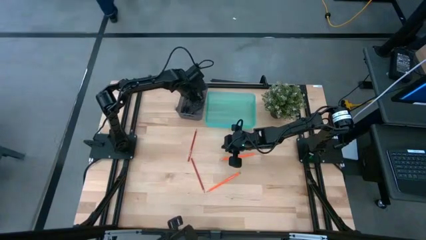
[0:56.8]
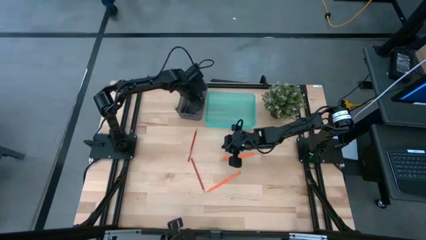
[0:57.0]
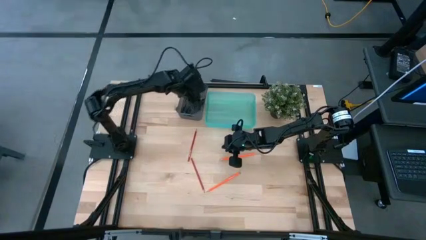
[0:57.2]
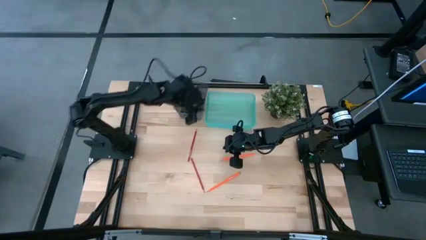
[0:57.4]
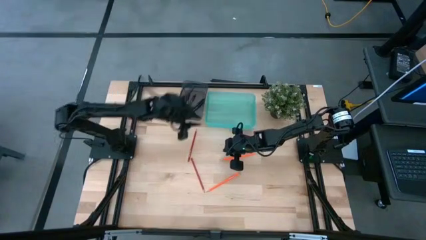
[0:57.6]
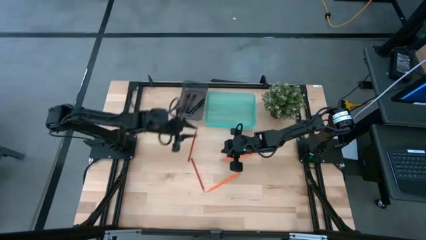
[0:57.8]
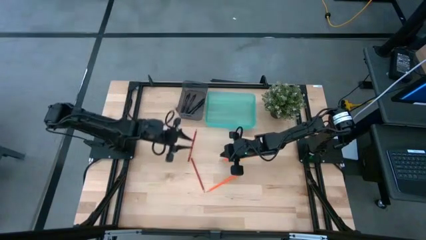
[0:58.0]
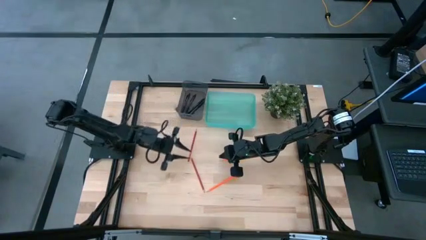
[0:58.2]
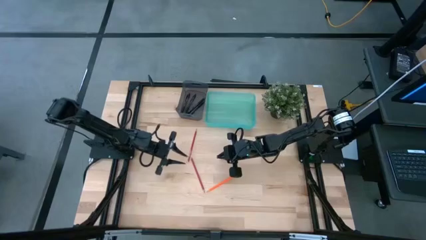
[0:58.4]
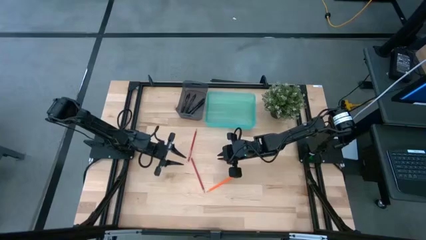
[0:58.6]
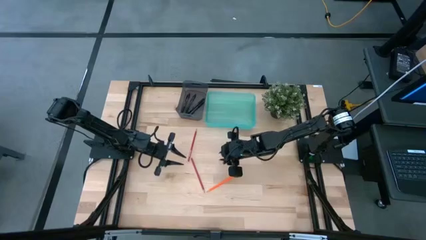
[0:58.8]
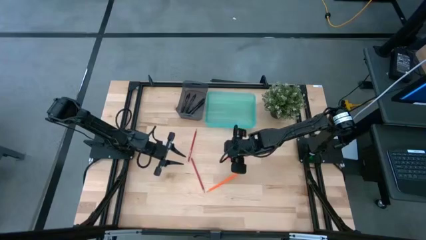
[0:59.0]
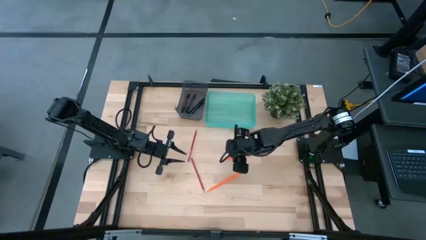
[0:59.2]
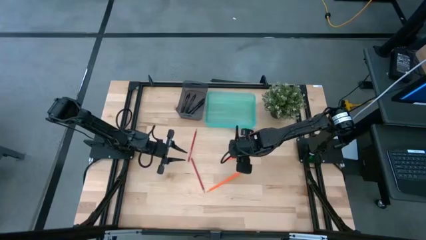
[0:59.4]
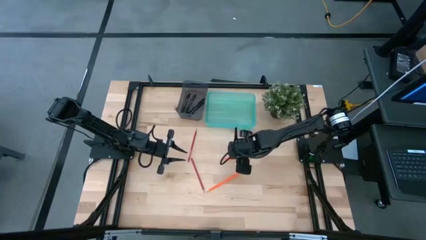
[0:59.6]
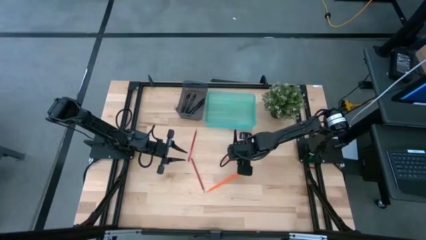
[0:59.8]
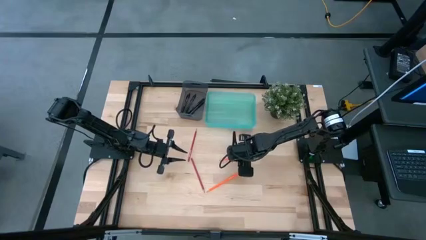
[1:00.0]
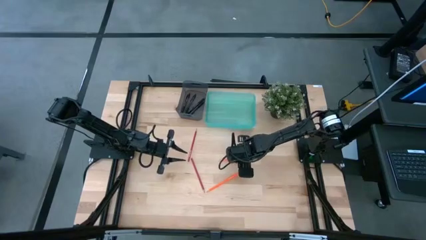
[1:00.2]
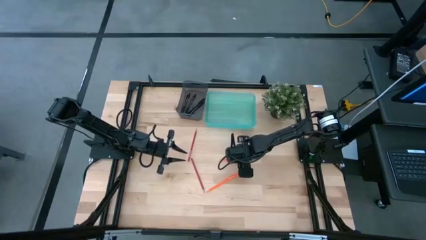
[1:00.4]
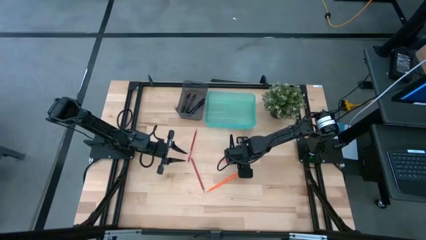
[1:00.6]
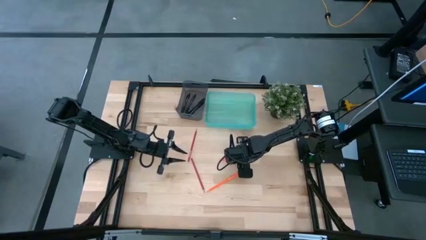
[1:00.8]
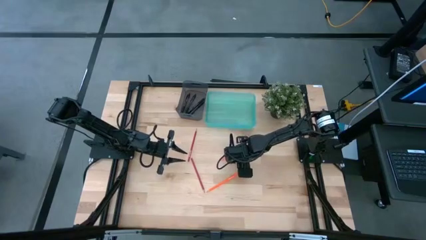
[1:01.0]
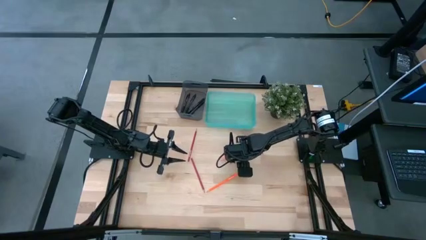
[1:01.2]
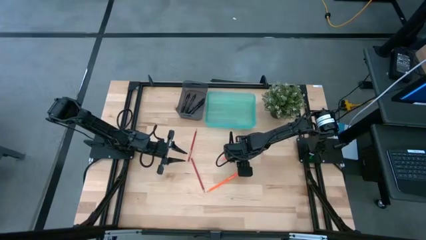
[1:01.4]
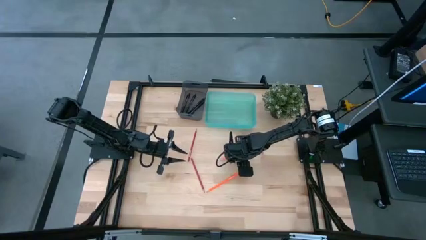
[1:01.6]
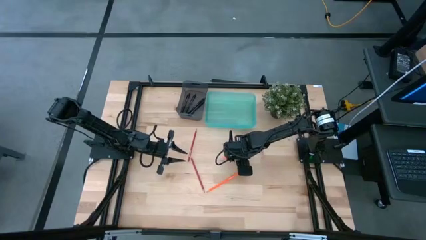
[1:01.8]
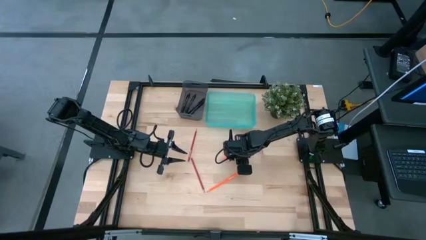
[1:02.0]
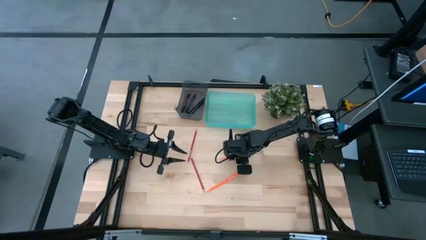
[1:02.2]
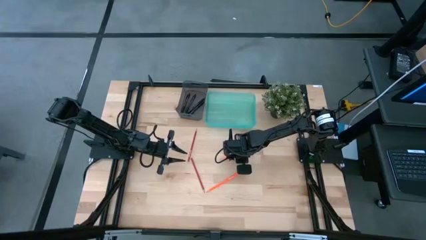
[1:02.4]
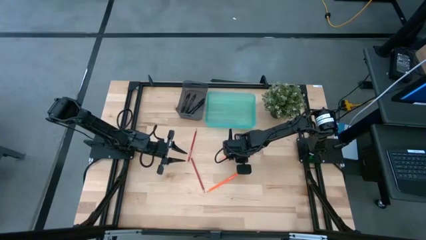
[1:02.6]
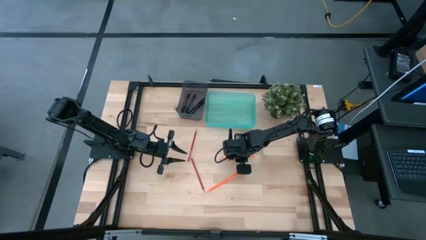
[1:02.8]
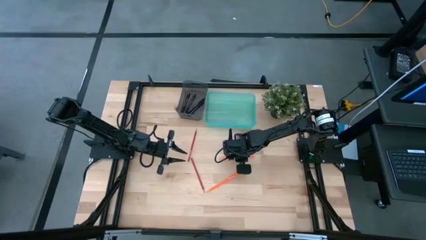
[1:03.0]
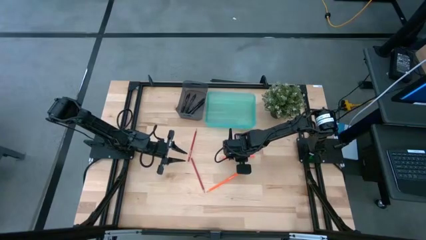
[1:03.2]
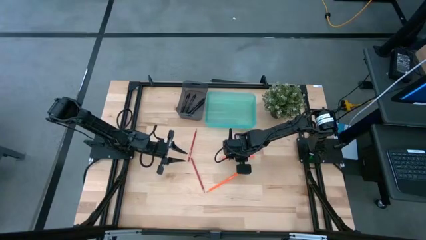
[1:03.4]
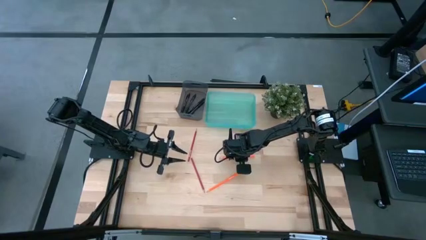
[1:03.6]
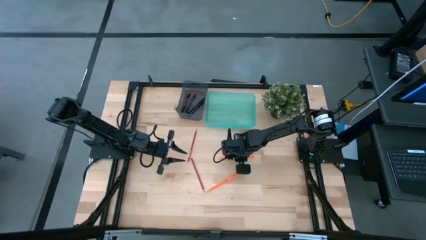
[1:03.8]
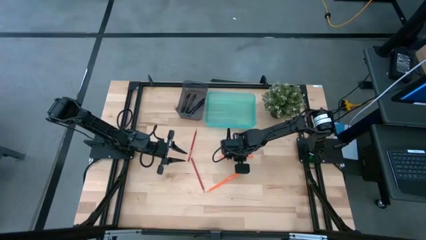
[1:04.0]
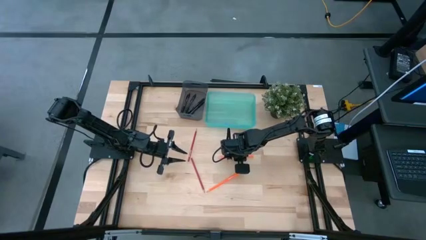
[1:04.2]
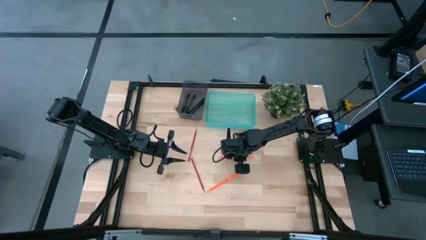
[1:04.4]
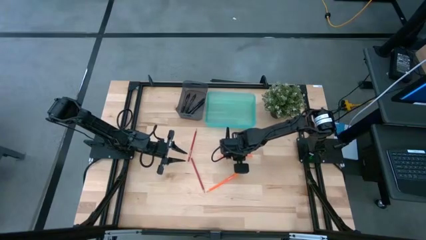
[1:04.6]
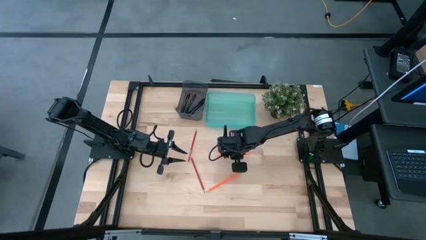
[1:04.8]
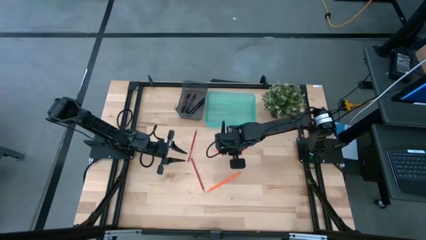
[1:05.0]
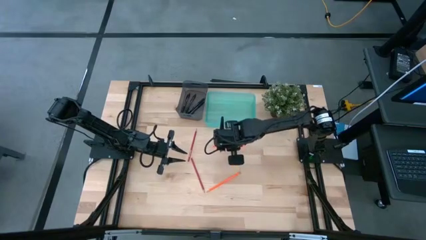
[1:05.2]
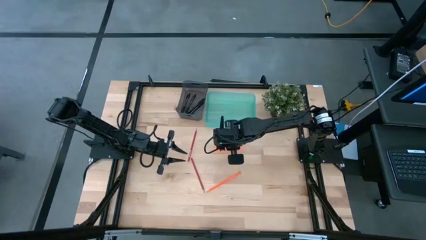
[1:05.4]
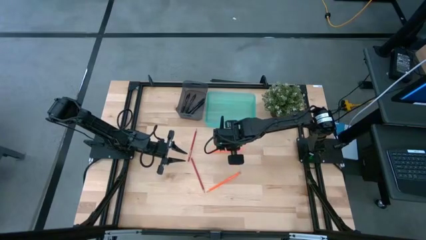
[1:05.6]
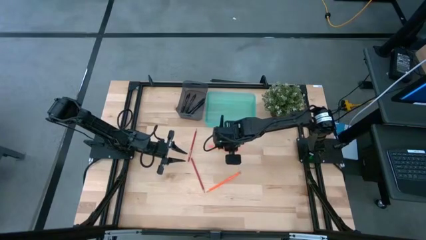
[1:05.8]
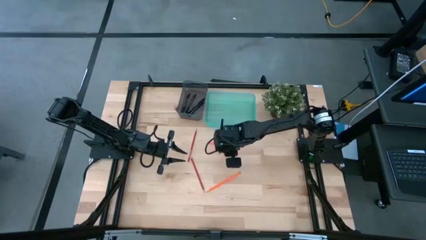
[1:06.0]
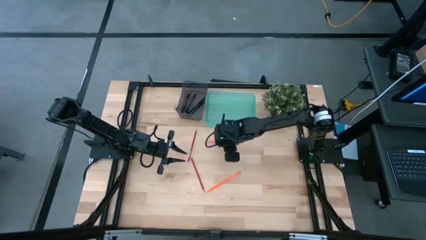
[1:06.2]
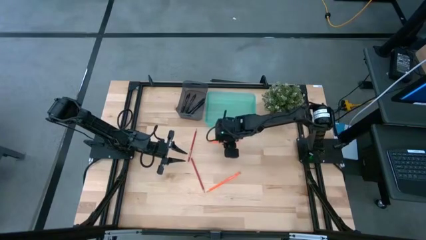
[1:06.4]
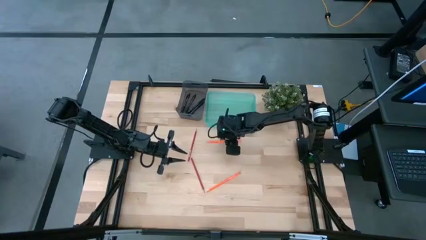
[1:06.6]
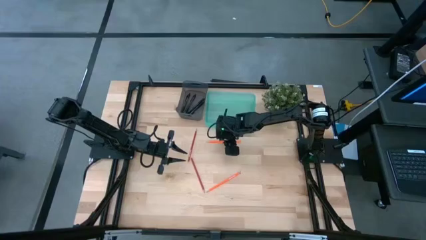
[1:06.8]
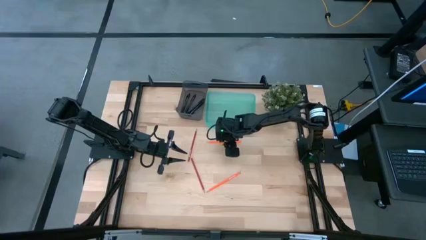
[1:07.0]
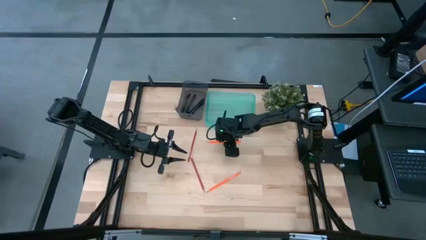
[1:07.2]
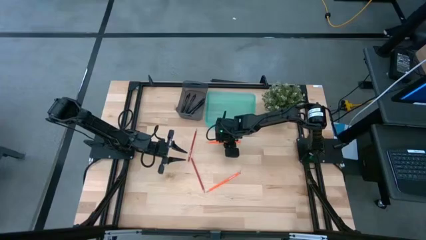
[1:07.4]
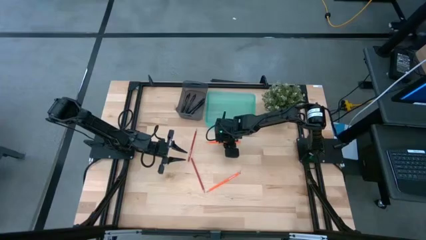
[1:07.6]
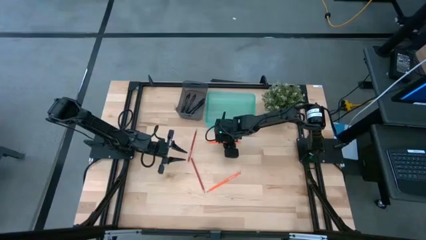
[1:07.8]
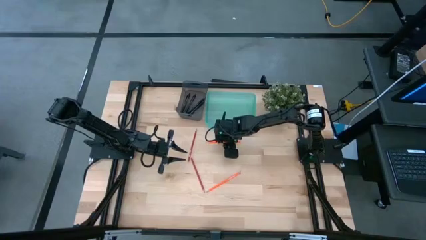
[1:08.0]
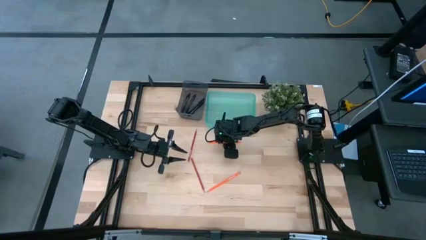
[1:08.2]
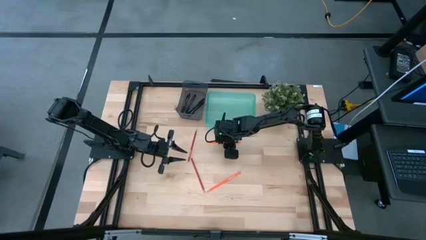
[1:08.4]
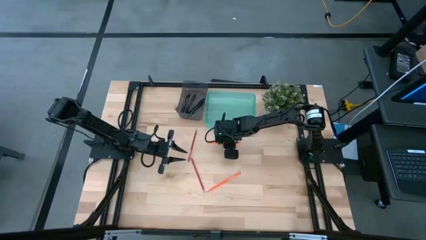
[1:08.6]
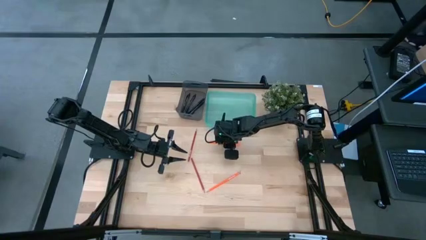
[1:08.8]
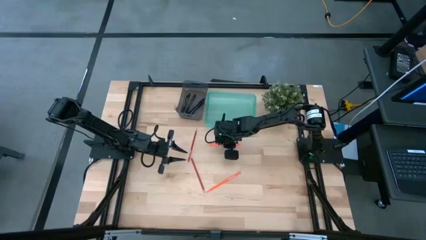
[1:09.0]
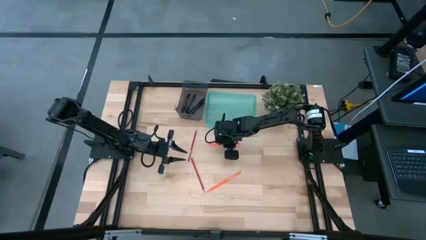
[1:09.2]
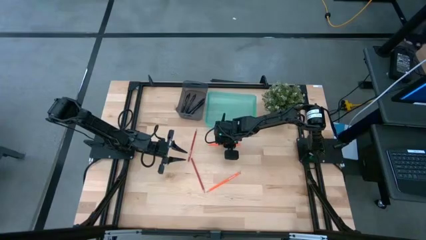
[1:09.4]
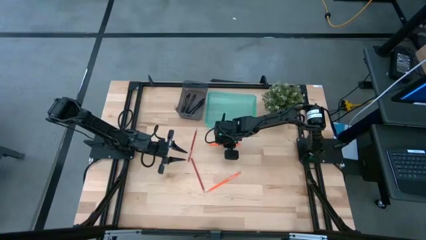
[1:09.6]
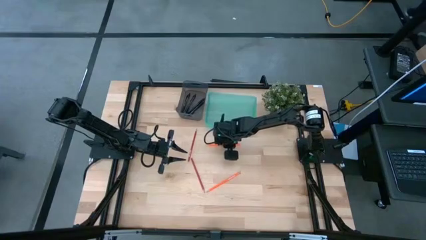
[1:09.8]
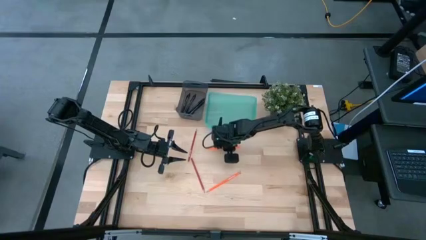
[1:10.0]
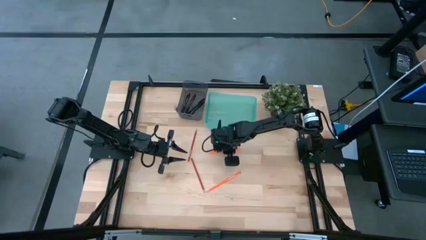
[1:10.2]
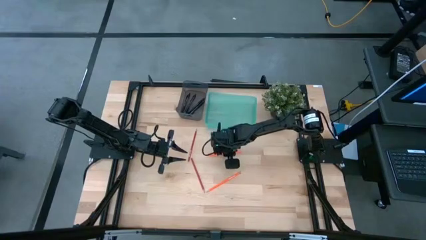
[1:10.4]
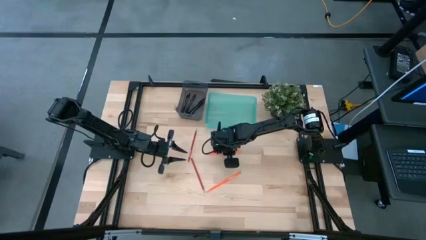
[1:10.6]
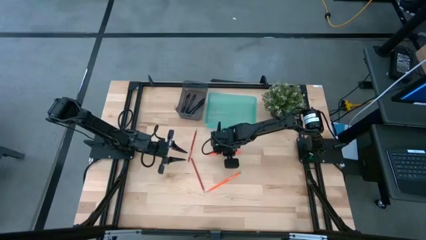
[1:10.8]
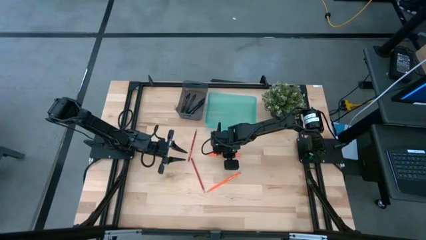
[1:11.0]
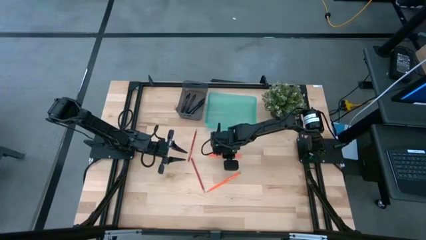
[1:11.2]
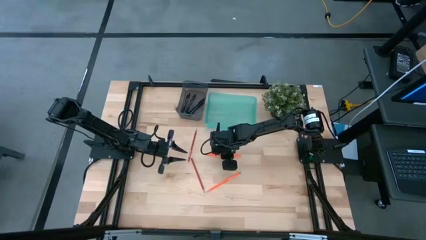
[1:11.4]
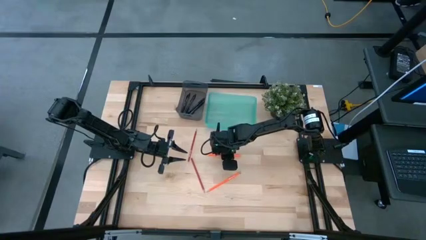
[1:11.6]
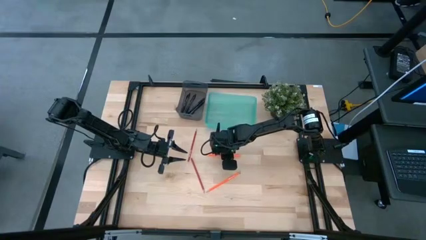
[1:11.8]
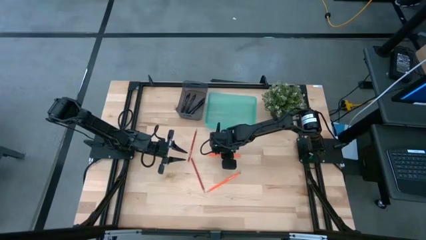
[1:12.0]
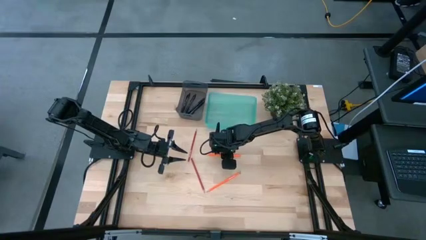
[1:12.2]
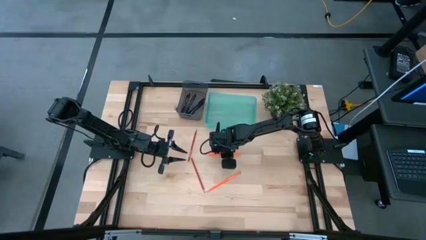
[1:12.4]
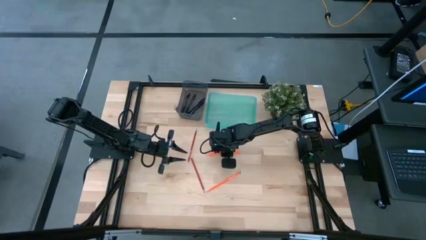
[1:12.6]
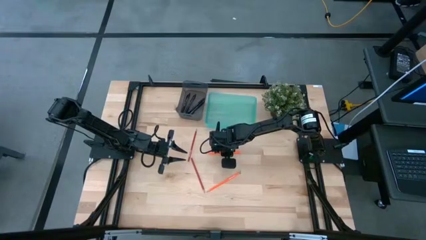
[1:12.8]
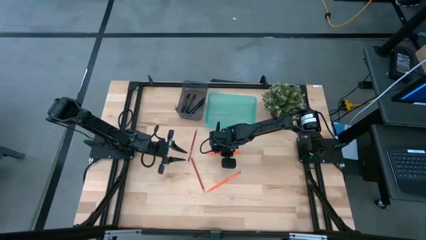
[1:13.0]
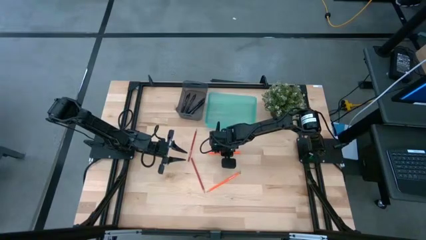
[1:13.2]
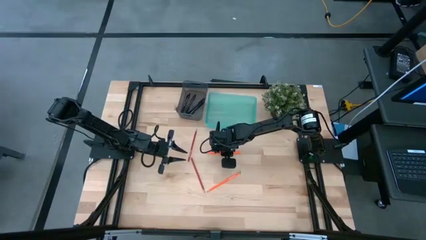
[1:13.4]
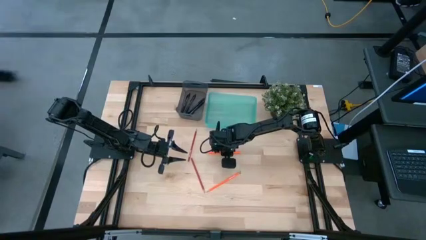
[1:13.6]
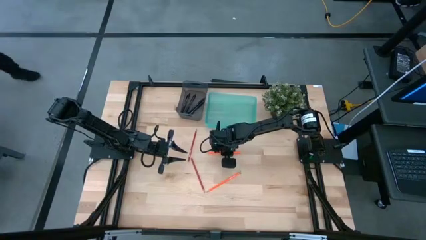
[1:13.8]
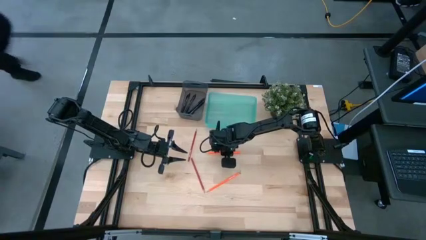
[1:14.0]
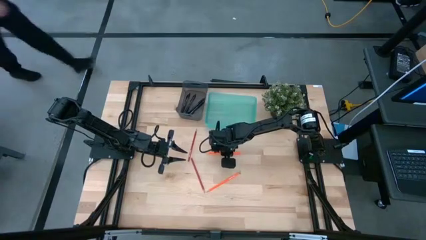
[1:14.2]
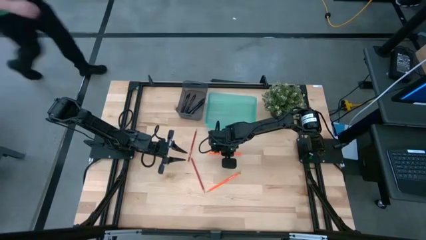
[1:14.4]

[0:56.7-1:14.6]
Task: Sort pens & pencils
Put the orange pencil into the green bin
